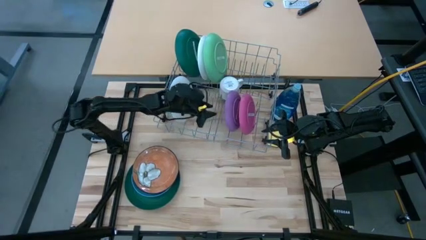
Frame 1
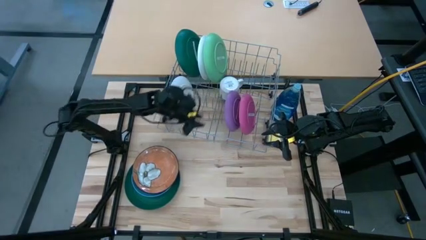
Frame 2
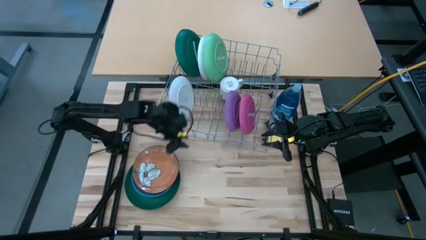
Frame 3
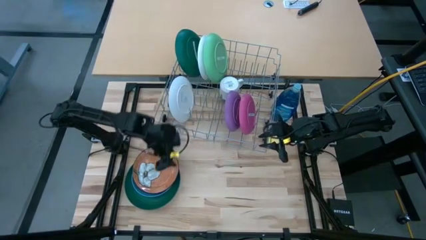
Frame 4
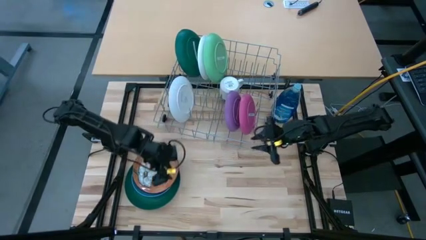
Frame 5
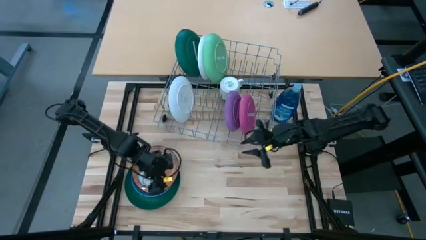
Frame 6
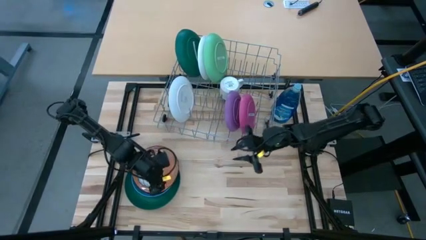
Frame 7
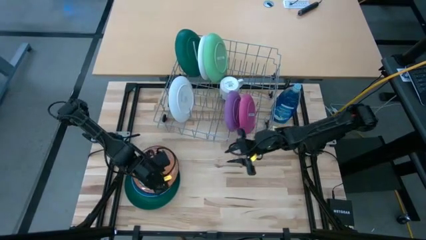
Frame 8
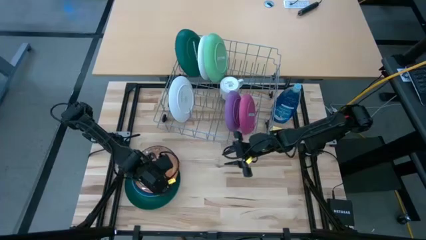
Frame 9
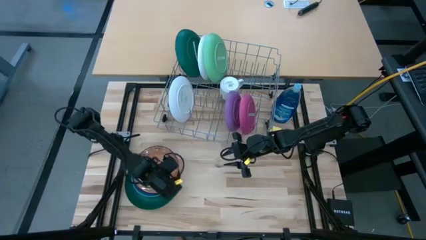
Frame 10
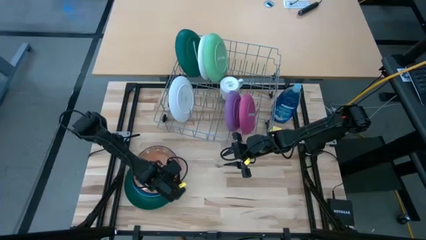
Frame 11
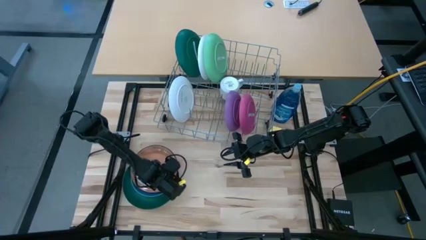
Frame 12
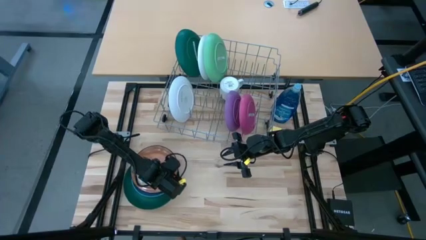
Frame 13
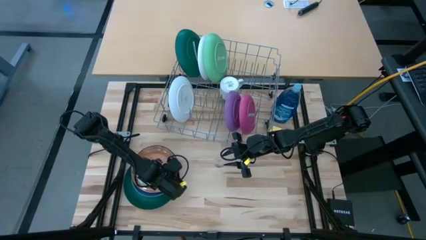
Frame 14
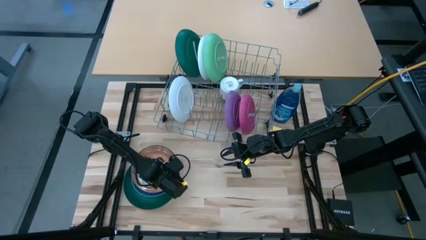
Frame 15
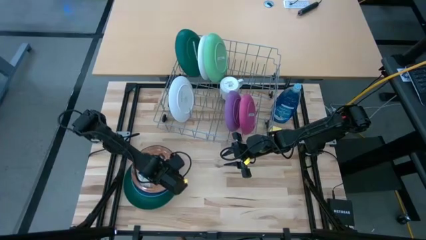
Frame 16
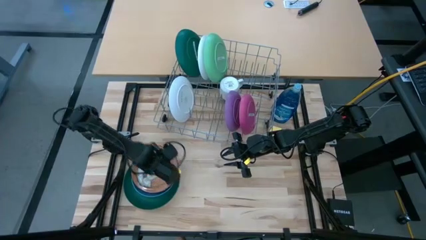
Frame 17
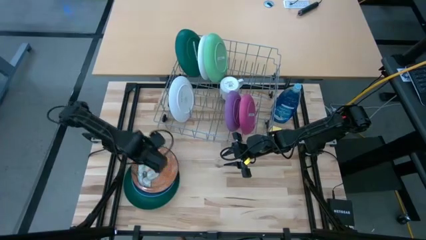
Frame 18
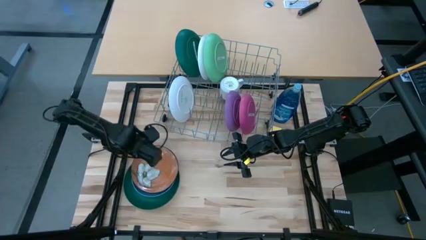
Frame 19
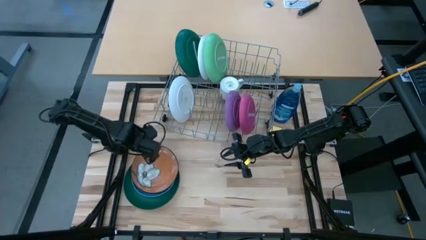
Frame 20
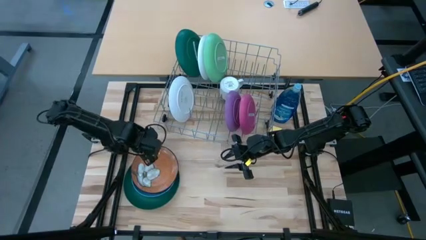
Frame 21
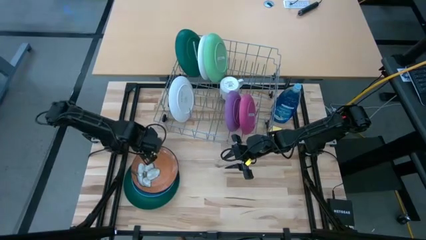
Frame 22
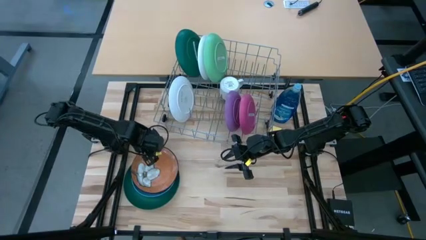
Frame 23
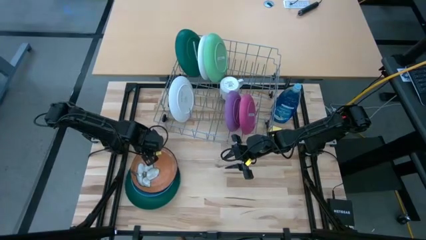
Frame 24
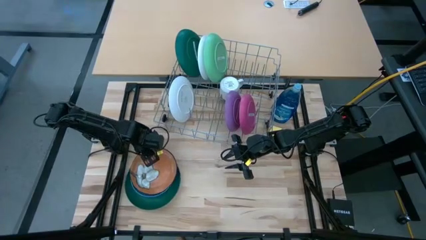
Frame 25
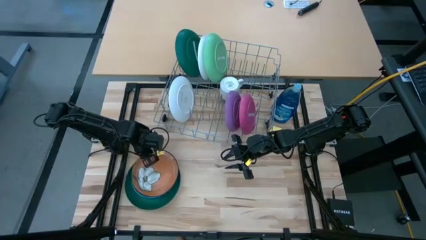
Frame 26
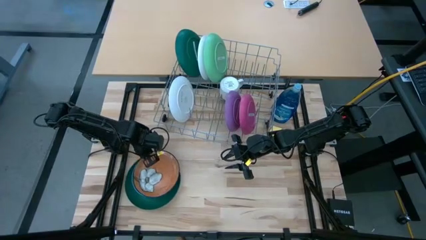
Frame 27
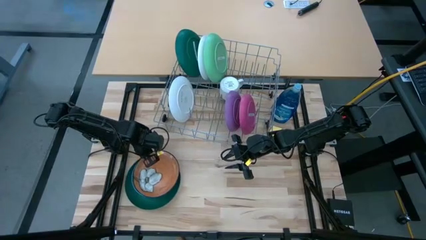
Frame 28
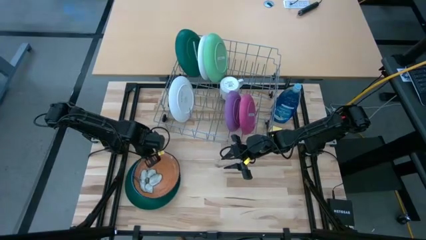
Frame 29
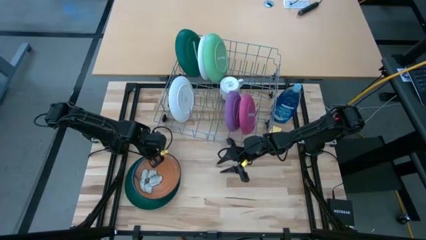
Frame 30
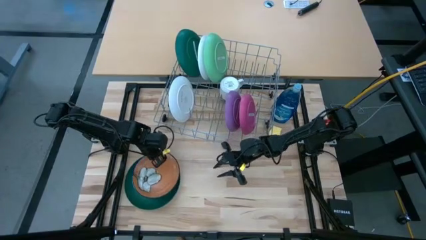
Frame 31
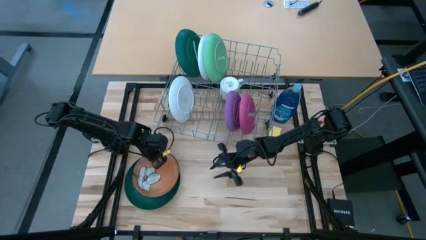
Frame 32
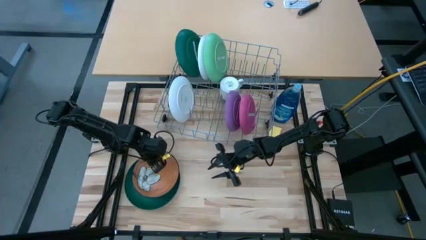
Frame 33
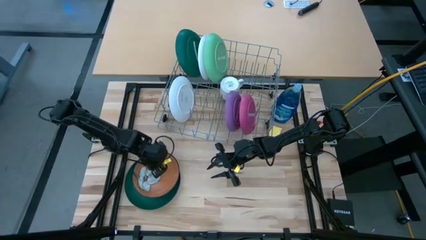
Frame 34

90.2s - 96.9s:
Task: Sort dishes
Put the brown plate in the dish rack

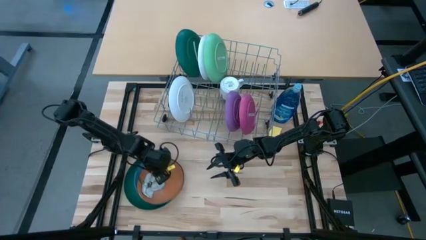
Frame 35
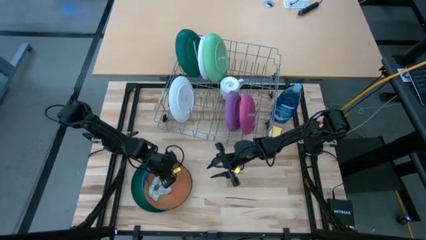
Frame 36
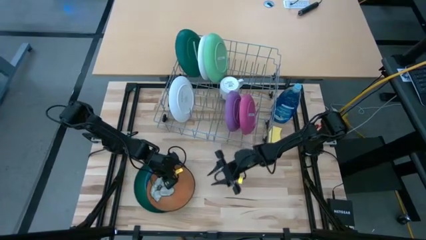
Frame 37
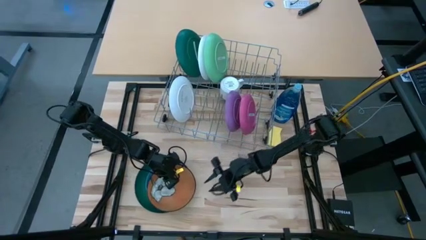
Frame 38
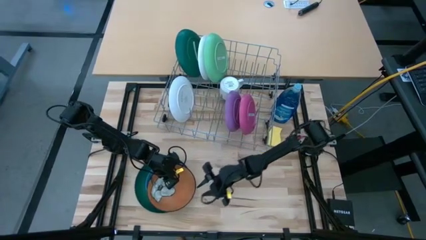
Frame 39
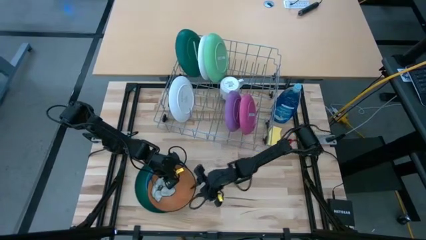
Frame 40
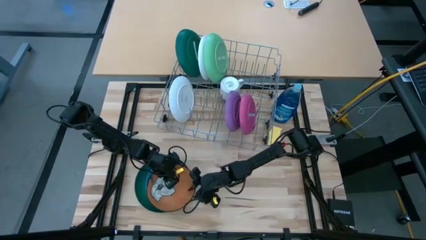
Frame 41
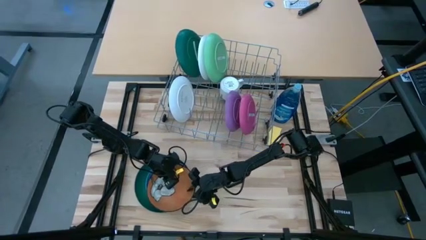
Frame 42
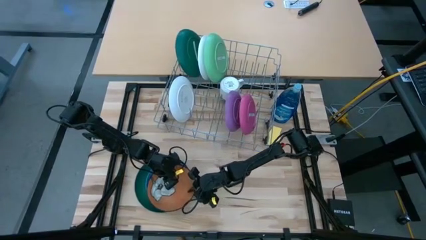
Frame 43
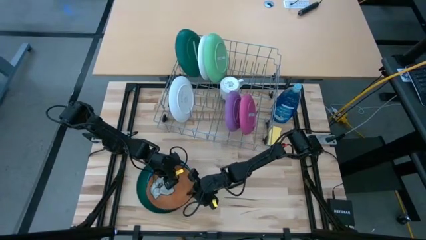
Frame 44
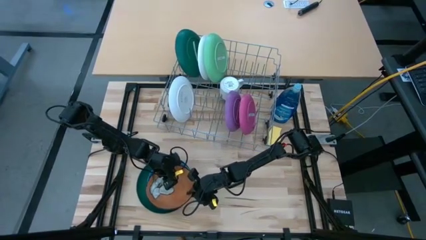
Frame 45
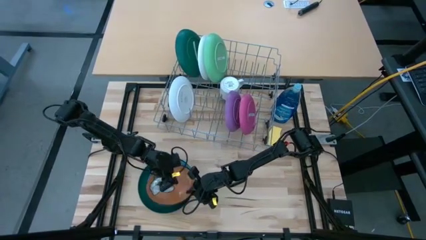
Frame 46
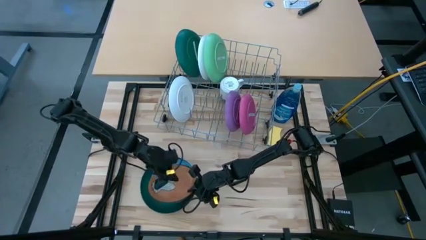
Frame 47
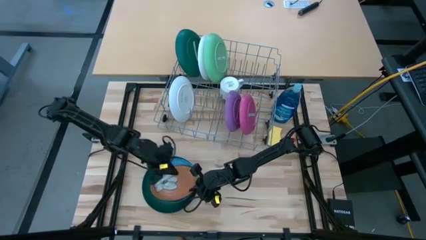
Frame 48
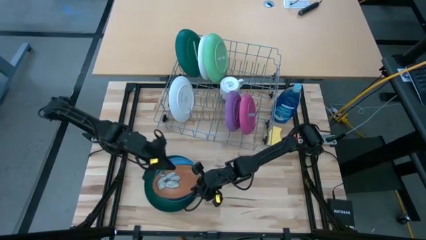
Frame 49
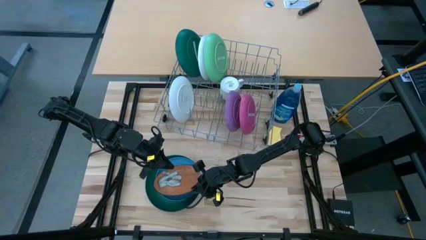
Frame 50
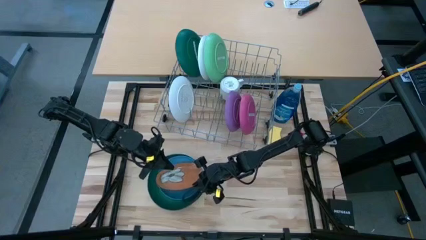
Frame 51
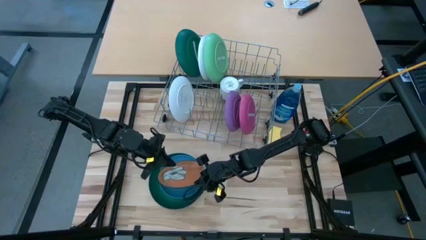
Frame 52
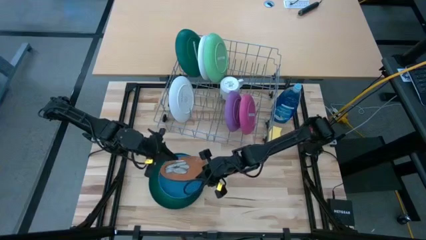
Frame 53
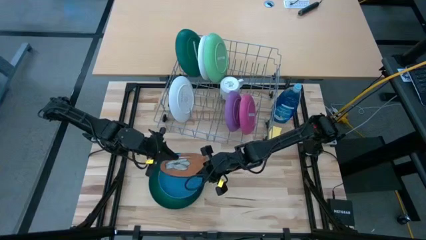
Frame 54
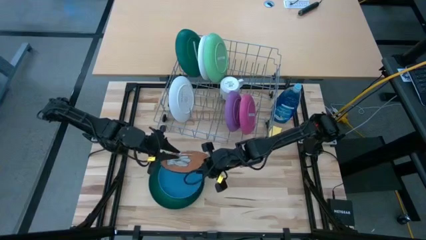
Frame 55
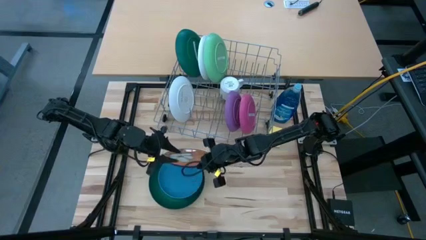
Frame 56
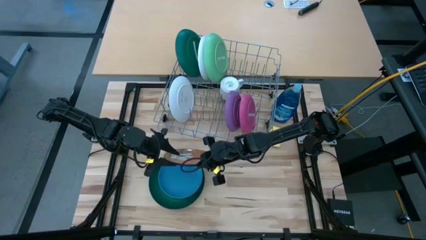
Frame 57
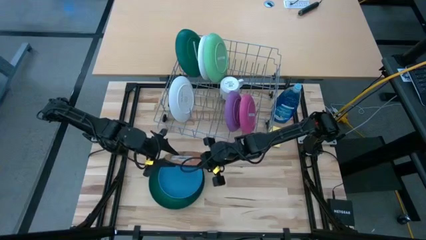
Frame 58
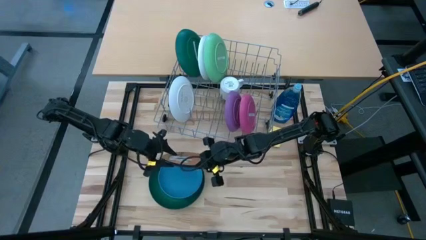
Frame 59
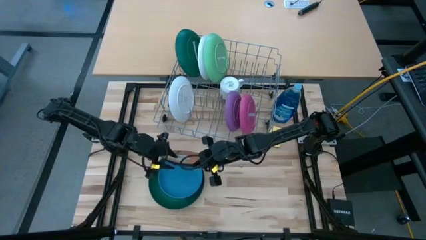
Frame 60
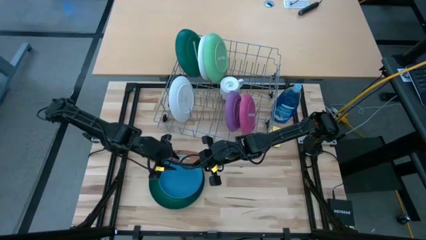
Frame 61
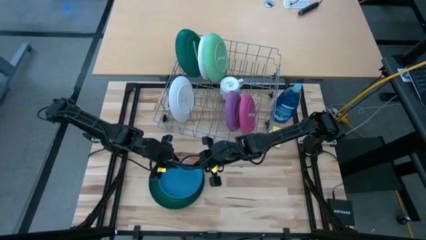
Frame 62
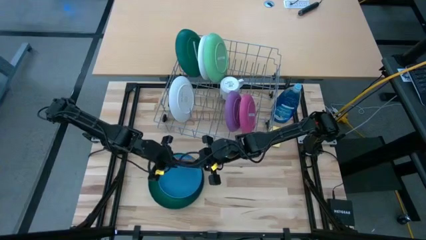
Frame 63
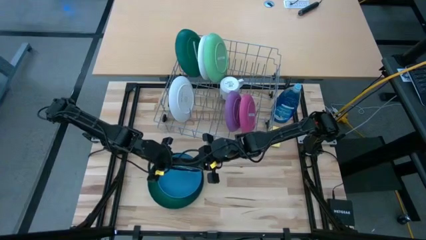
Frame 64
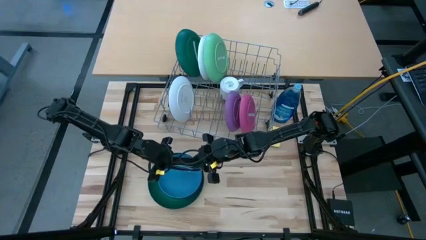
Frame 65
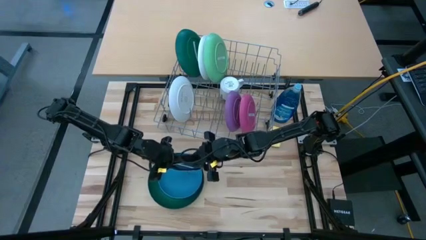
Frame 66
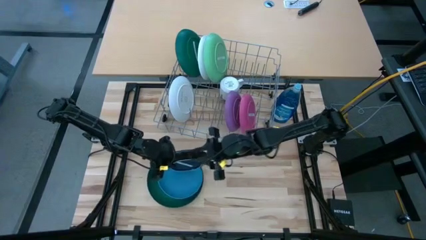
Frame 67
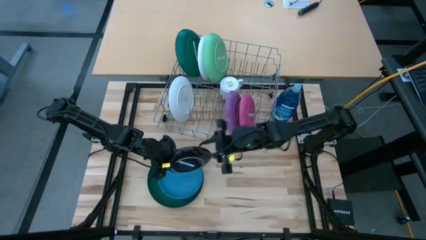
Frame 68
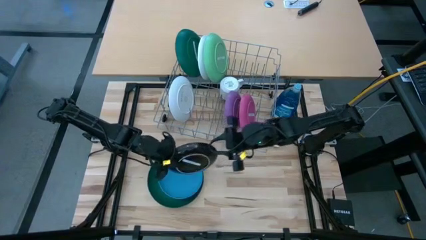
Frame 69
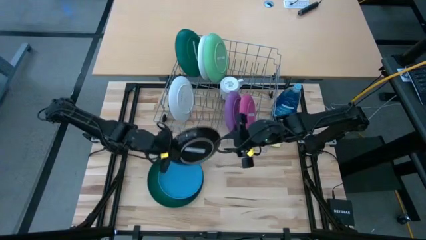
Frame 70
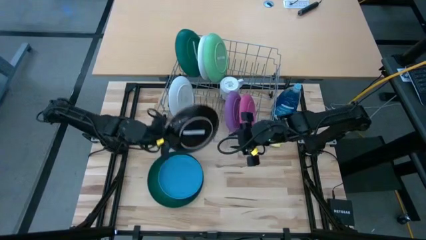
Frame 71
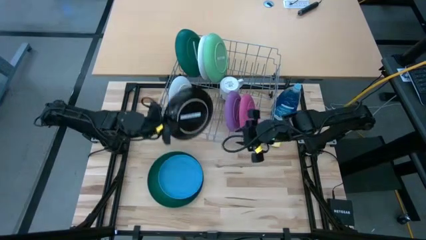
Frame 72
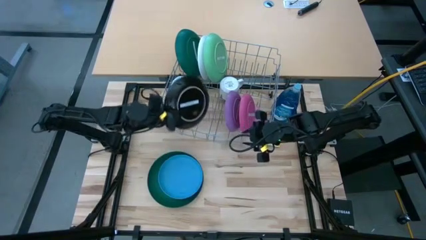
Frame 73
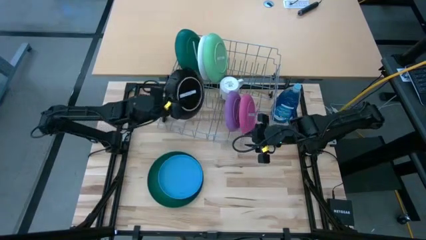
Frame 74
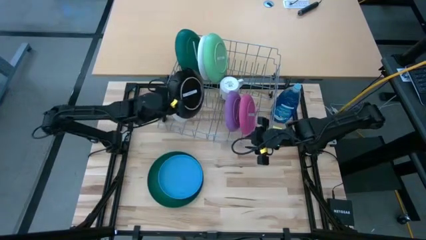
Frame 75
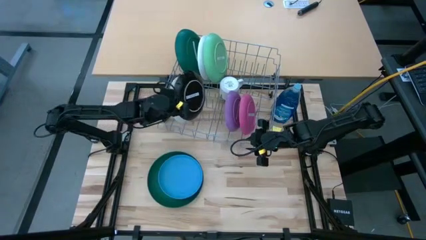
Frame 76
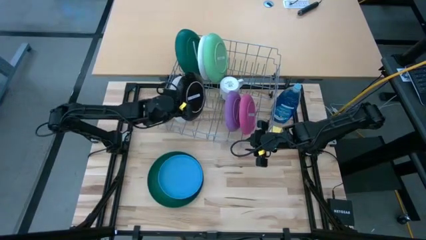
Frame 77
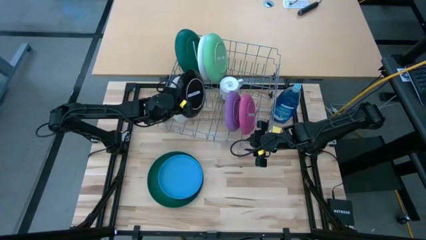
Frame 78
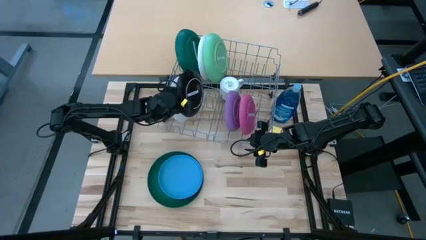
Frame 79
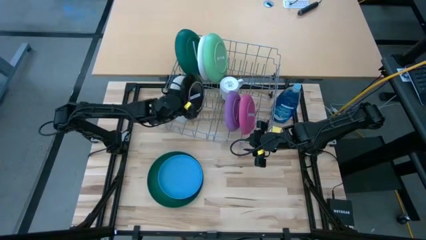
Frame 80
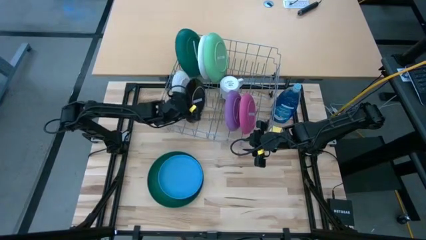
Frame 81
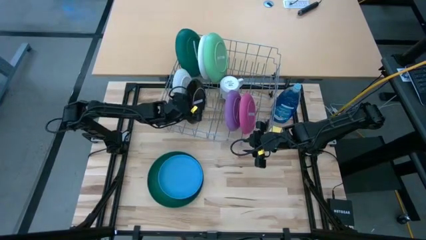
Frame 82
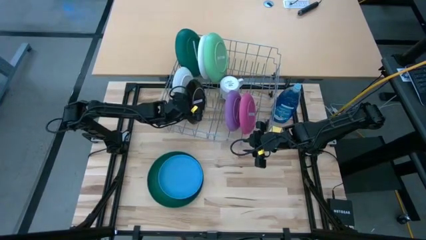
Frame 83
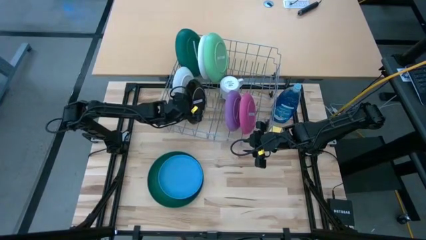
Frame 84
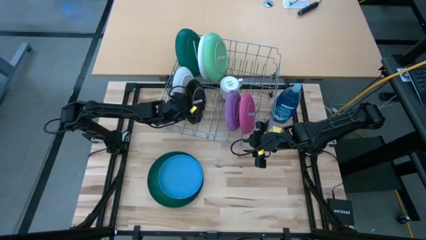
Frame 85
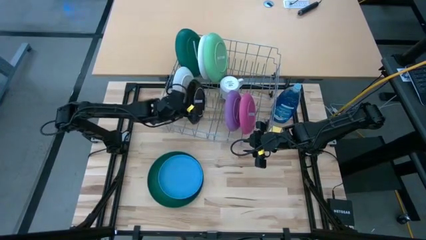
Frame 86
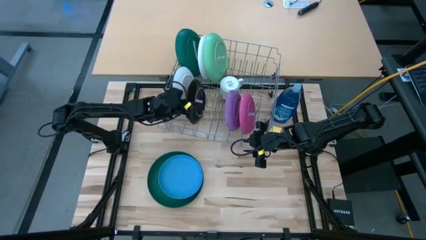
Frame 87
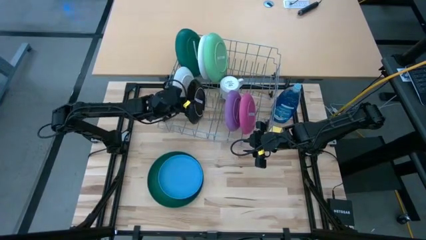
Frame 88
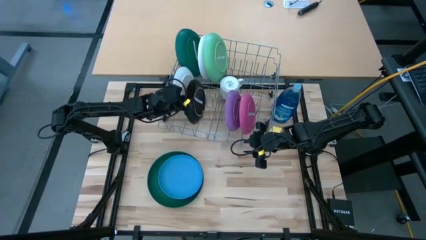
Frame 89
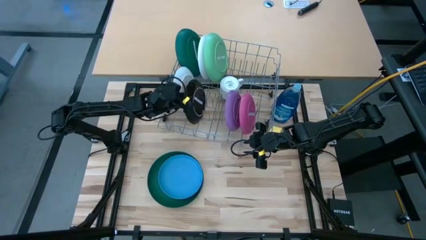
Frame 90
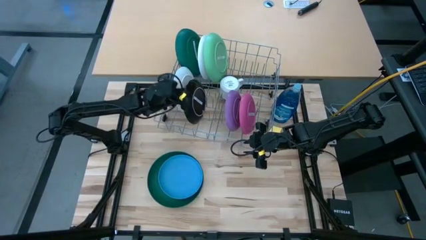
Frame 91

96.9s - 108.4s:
Put the brown plate in the dish rack
